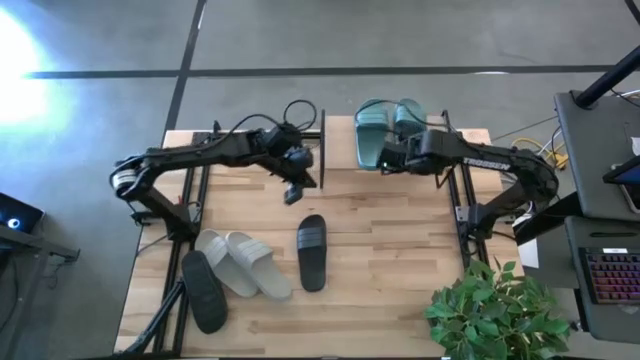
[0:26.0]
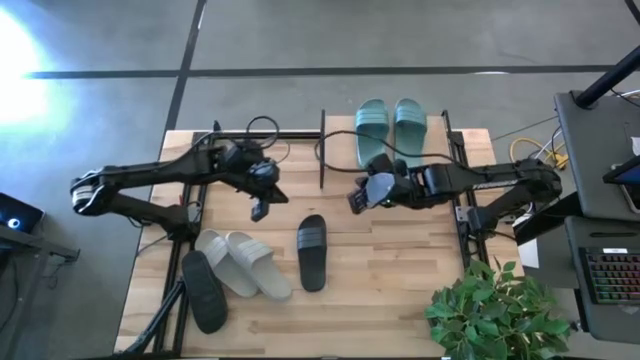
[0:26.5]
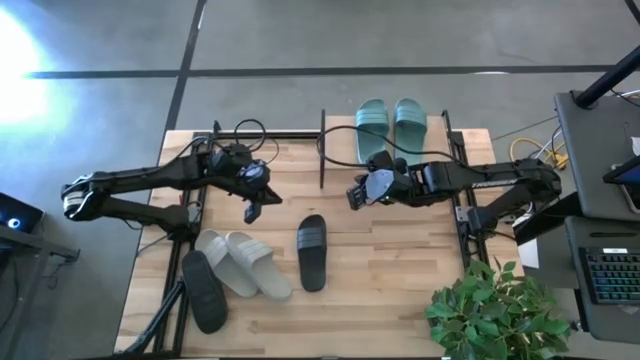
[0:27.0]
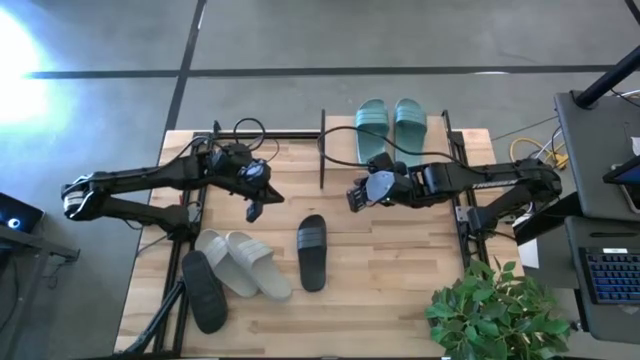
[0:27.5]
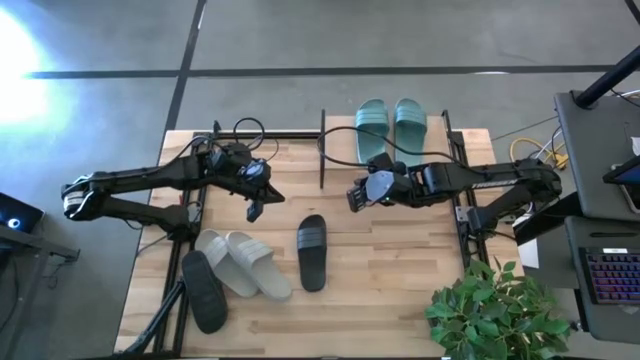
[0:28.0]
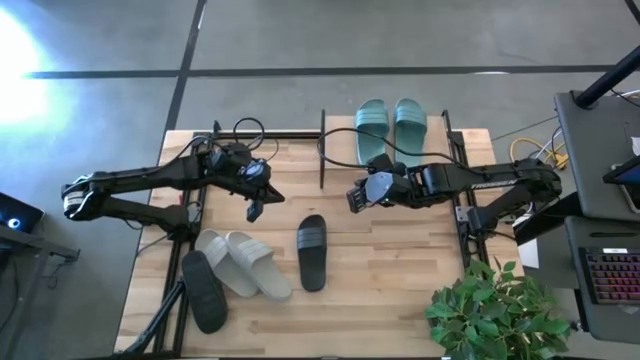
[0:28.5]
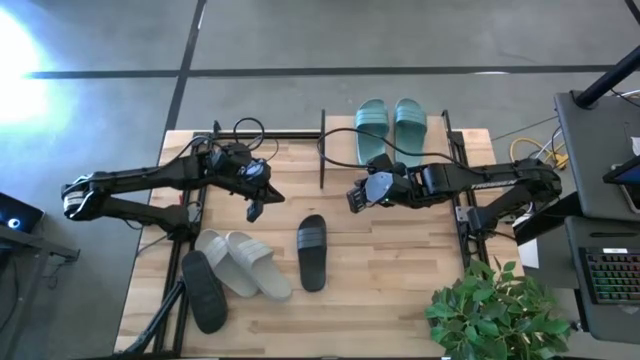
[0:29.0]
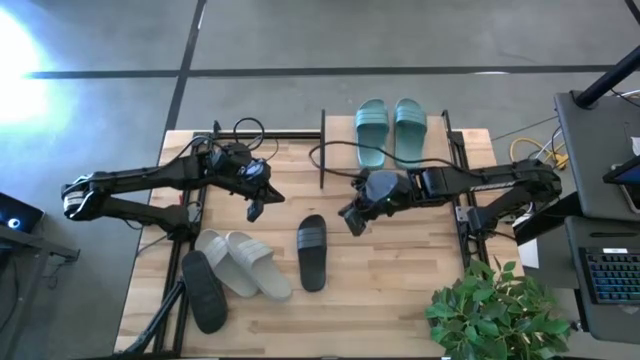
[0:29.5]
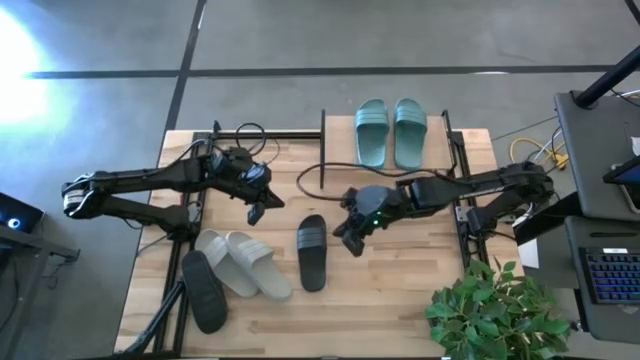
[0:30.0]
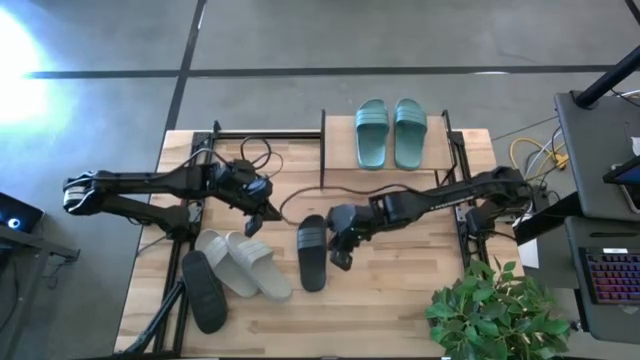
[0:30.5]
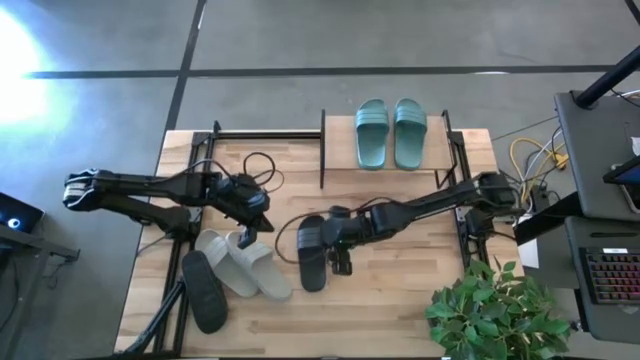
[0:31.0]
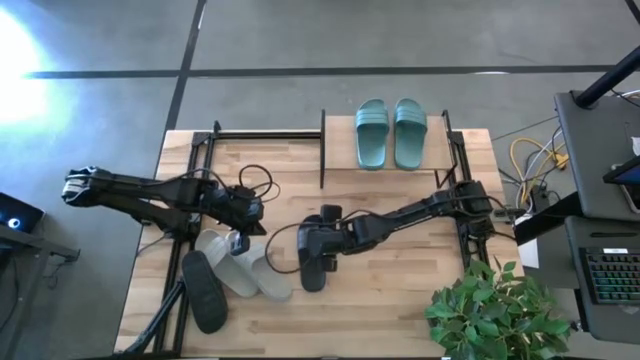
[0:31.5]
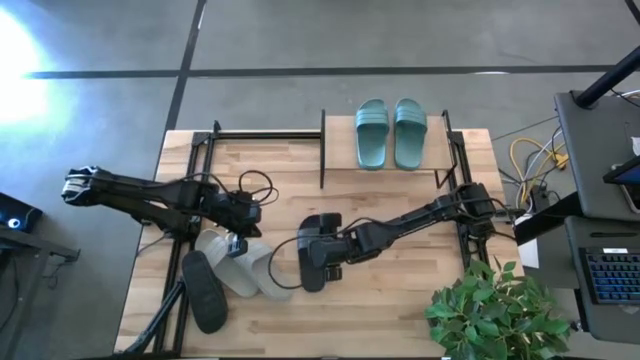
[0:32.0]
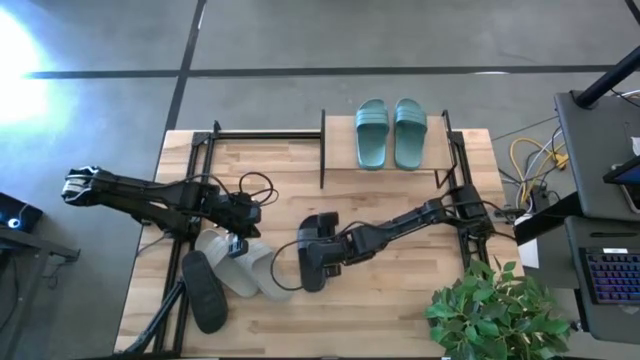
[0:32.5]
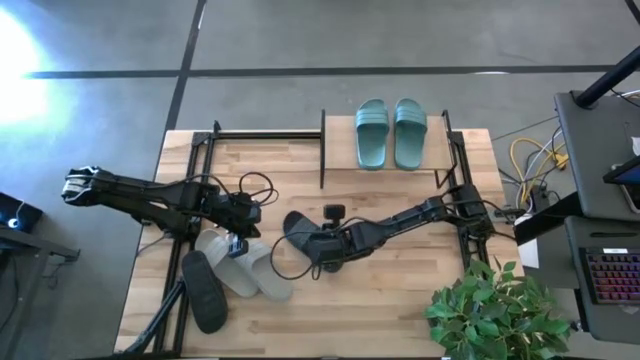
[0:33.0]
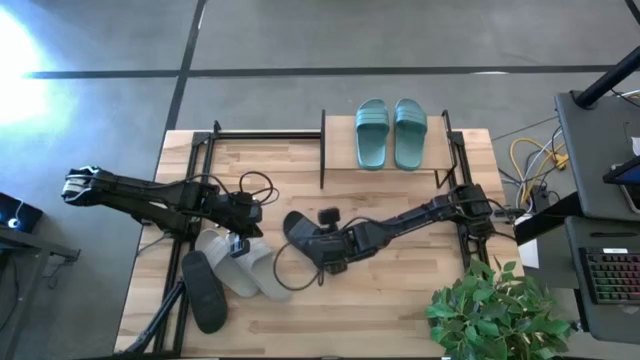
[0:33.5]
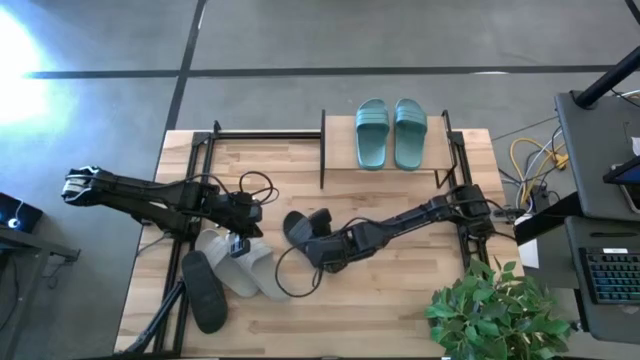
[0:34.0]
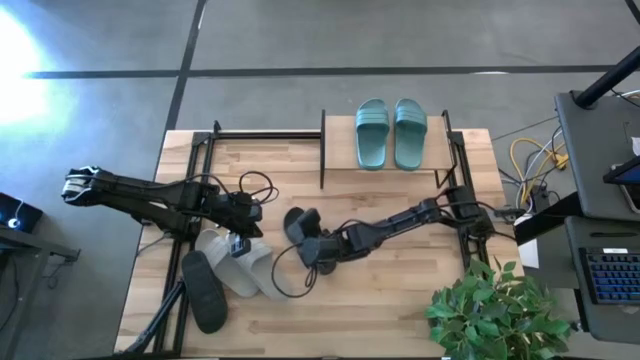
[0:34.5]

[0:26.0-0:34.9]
Task: Pick and place slides into the shelf
Put the top black slipper under the shelf

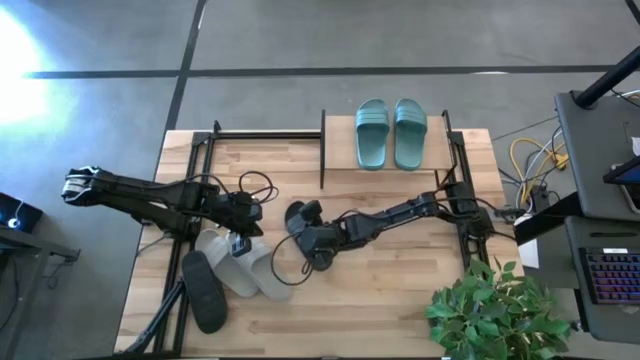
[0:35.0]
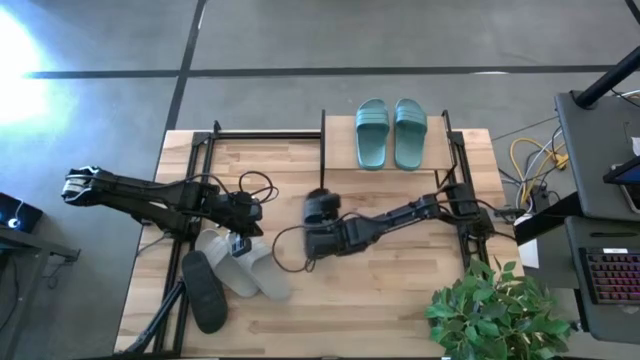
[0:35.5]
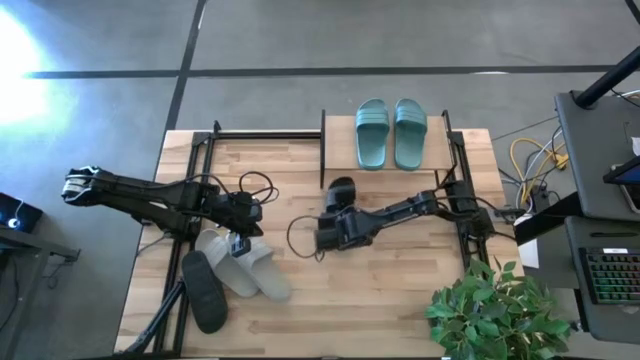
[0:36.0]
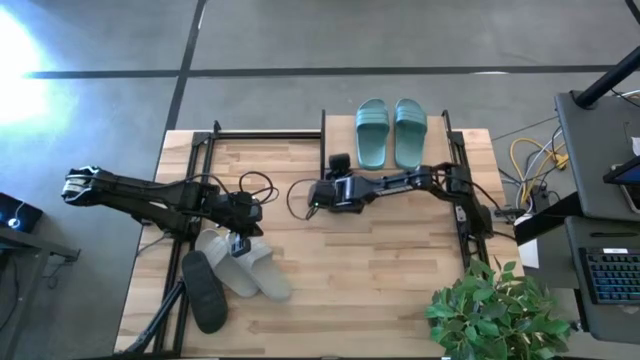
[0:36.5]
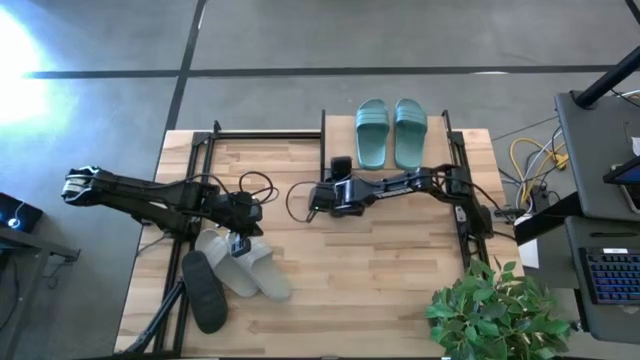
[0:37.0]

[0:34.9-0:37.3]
Put the top black slipper under the shelf

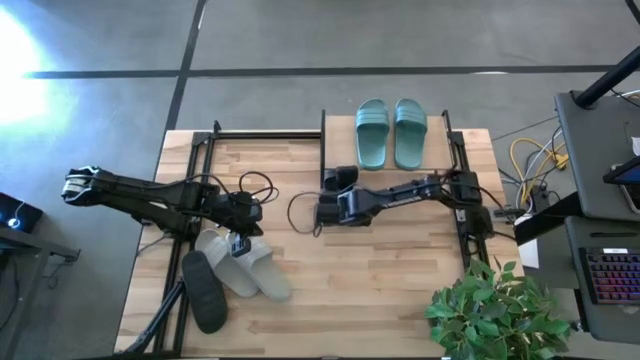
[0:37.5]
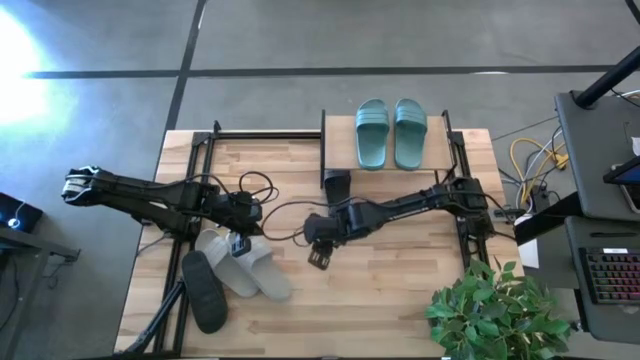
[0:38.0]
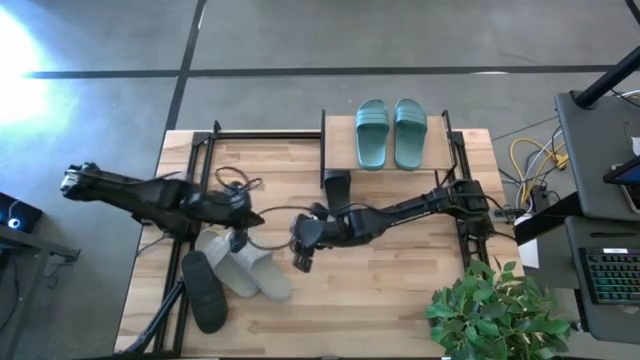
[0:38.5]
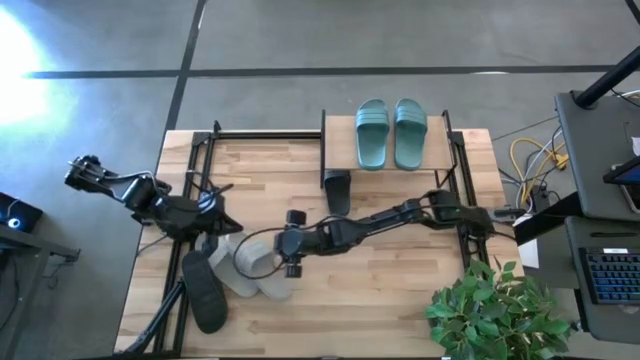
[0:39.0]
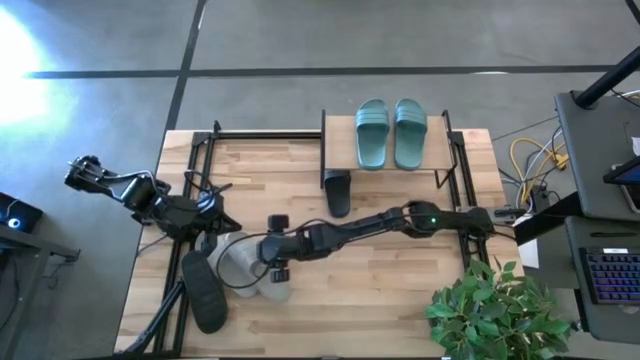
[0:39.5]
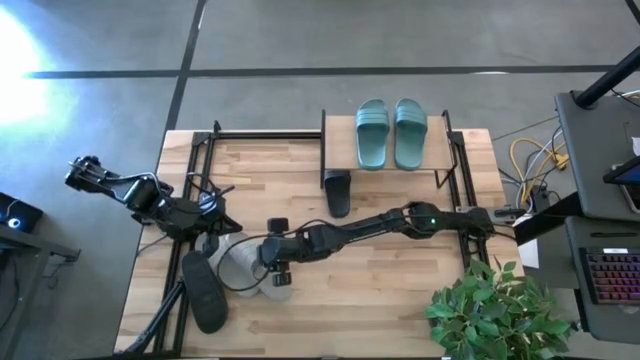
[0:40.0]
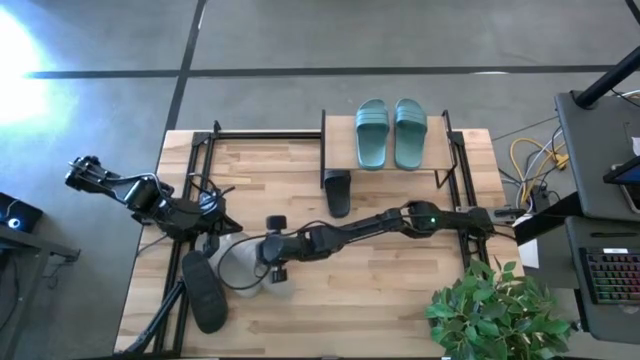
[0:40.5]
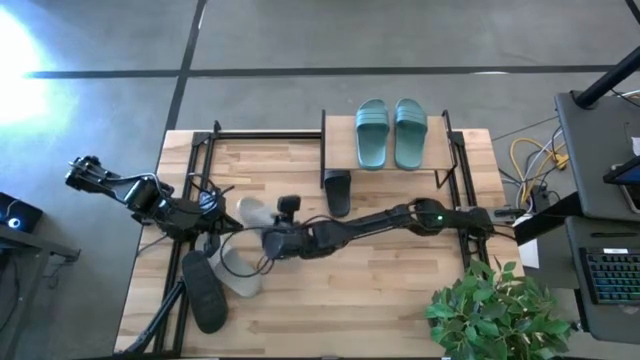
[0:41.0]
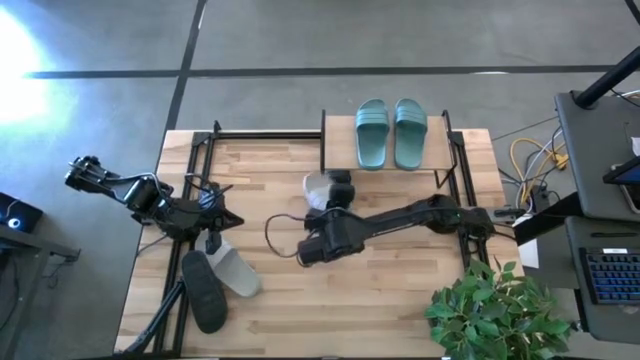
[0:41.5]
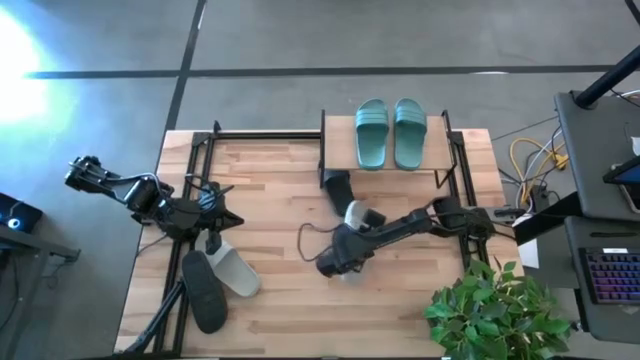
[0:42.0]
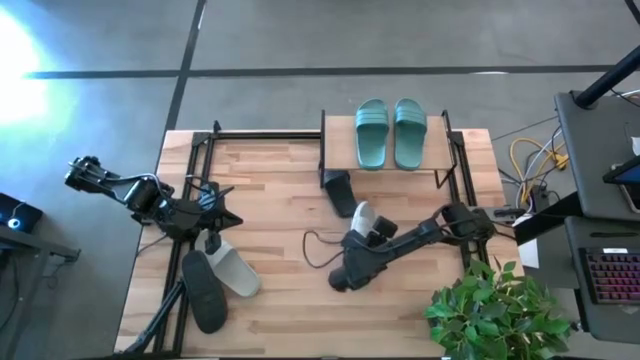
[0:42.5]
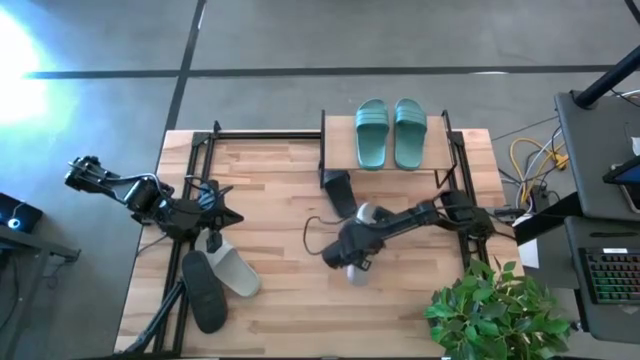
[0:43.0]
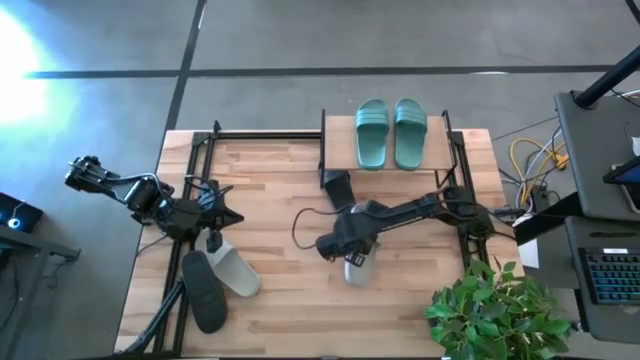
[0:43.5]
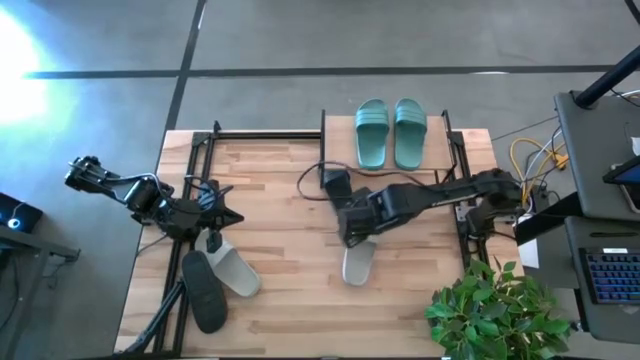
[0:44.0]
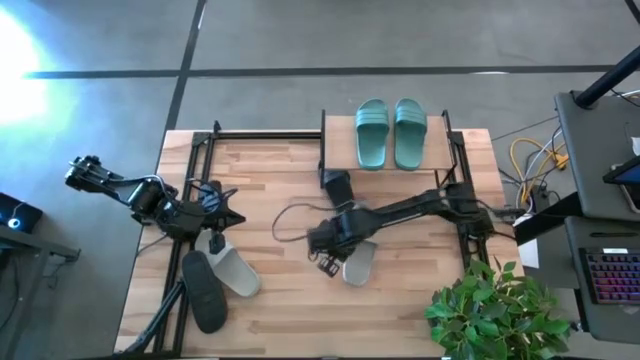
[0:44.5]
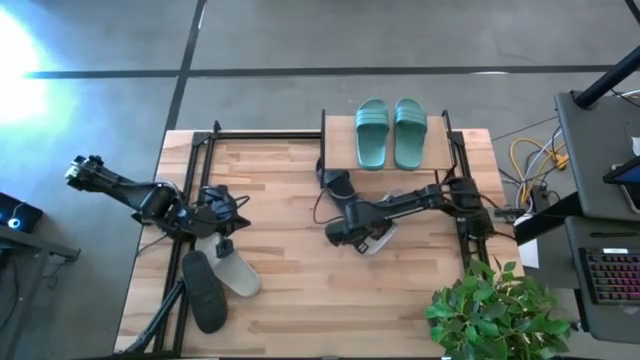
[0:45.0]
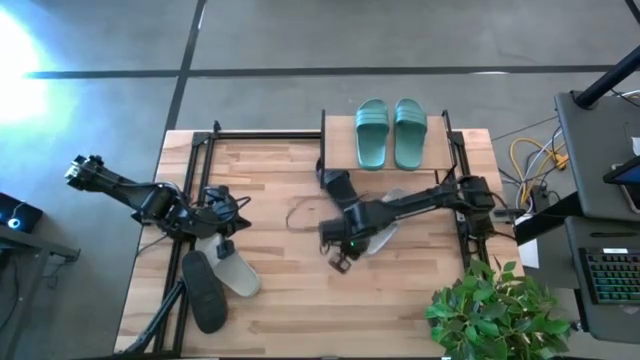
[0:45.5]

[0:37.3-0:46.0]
Put the right gray slipper under the shelf

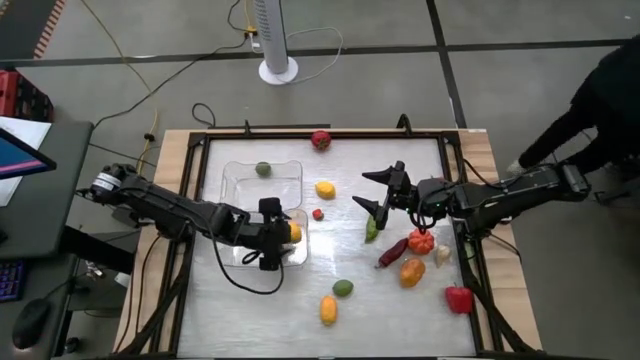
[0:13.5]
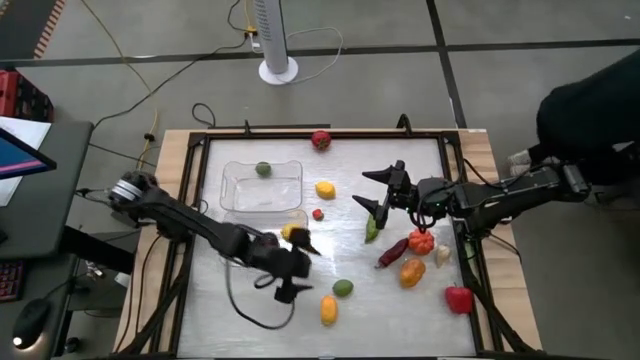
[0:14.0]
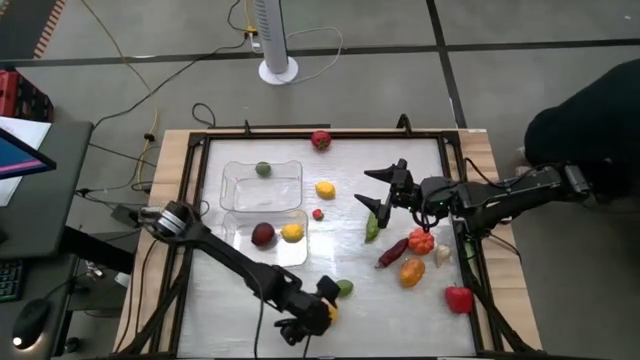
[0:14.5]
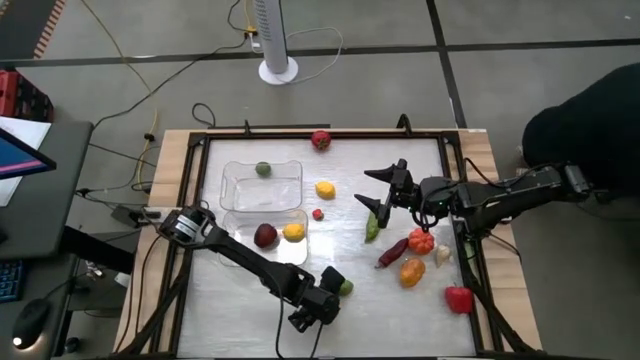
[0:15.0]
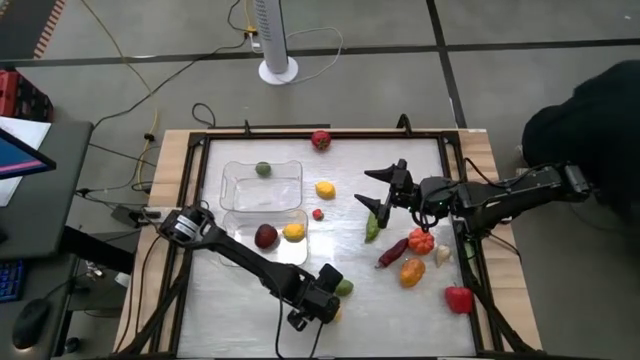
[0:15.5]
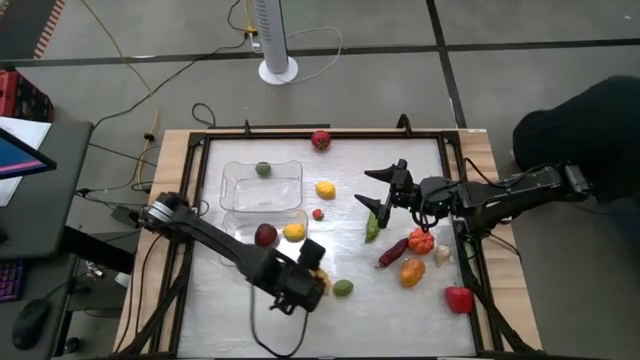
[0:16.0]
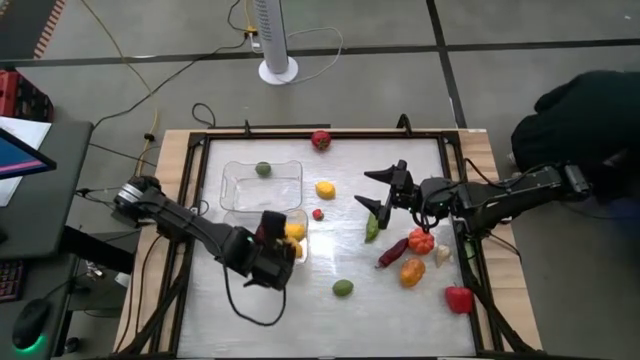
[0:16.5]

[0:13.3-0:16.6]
Task: Sort produce into baskets
Put the bottom yellow lemon into the bottom transparent bin
